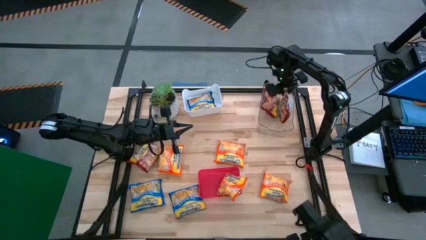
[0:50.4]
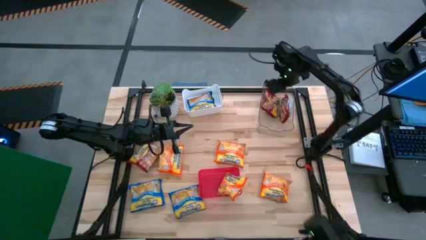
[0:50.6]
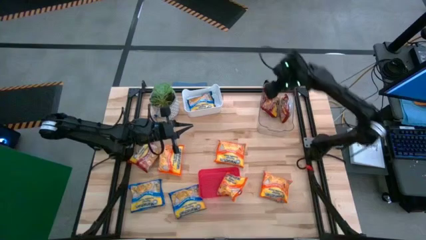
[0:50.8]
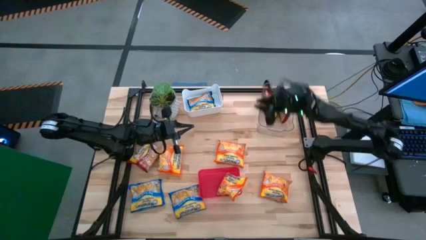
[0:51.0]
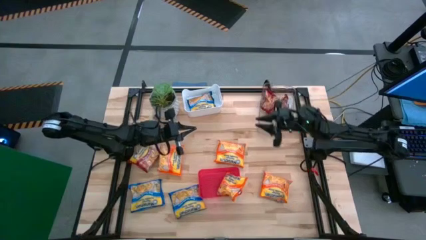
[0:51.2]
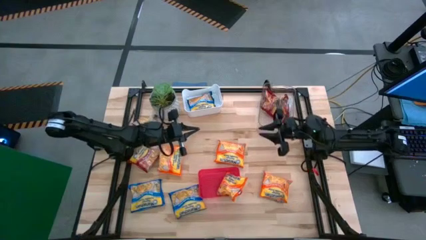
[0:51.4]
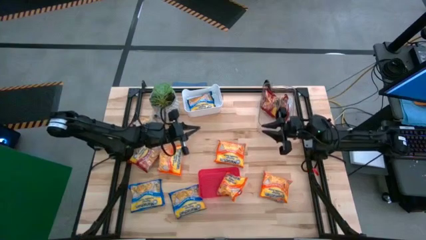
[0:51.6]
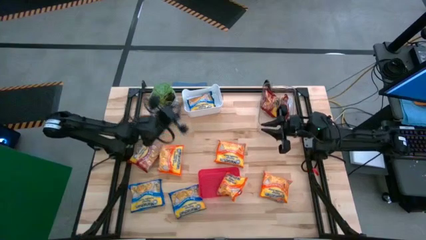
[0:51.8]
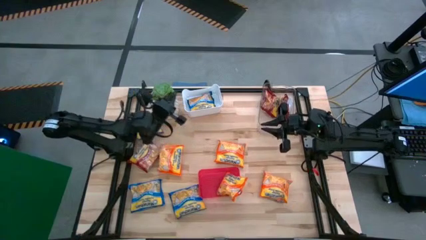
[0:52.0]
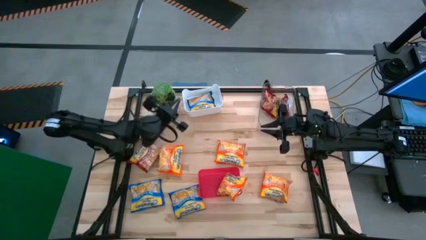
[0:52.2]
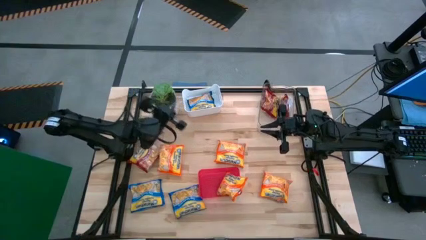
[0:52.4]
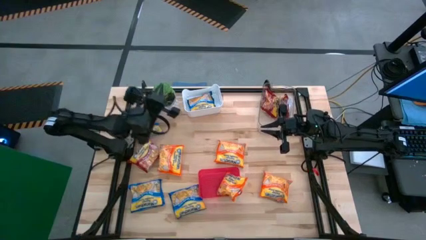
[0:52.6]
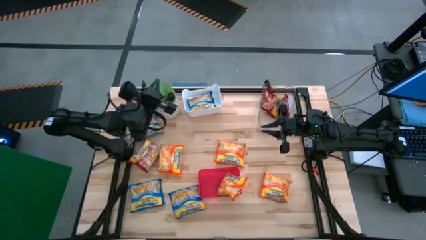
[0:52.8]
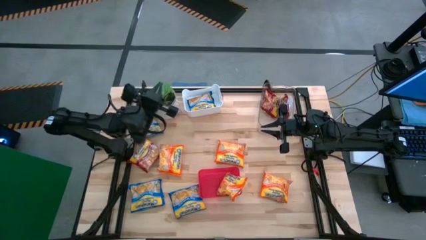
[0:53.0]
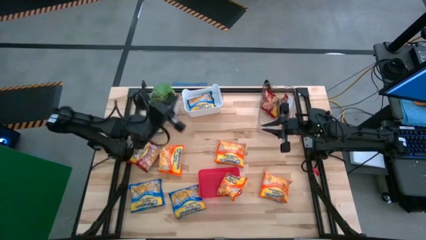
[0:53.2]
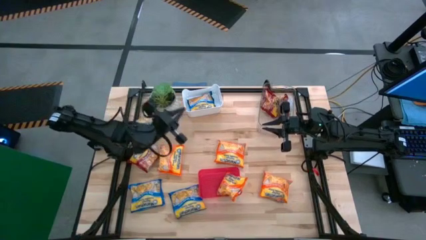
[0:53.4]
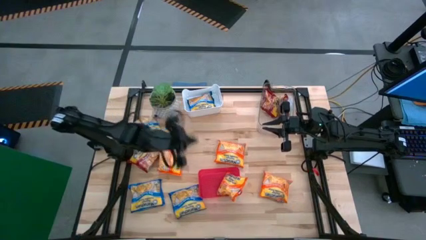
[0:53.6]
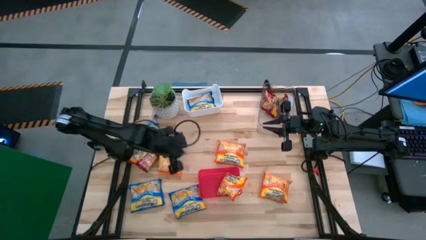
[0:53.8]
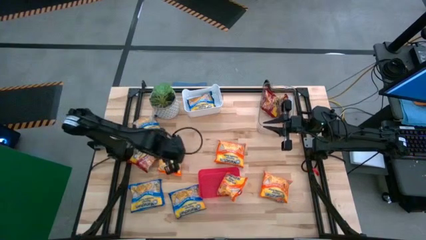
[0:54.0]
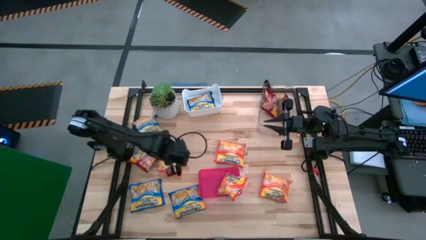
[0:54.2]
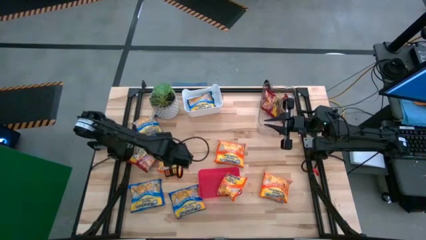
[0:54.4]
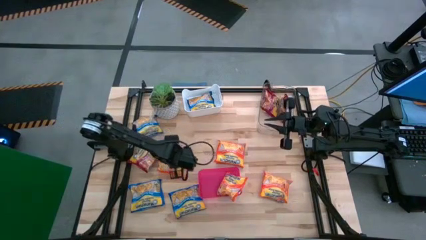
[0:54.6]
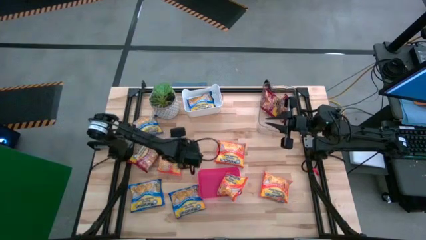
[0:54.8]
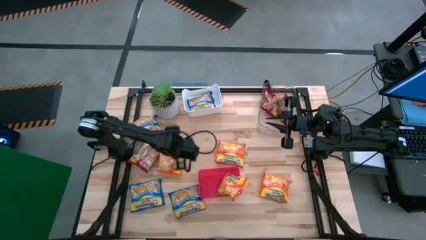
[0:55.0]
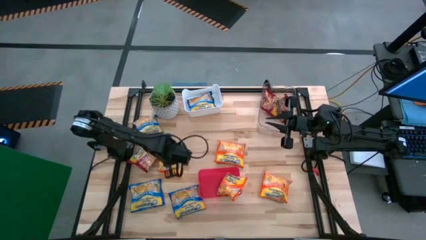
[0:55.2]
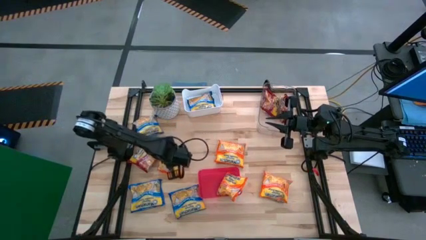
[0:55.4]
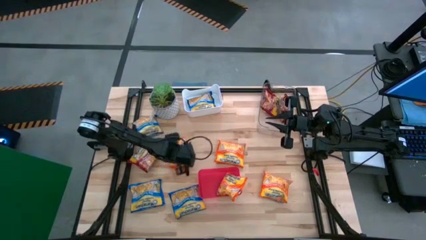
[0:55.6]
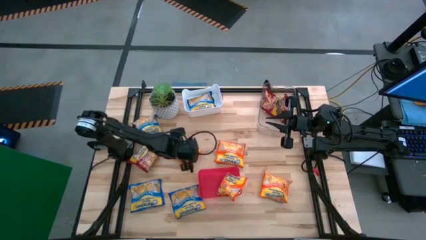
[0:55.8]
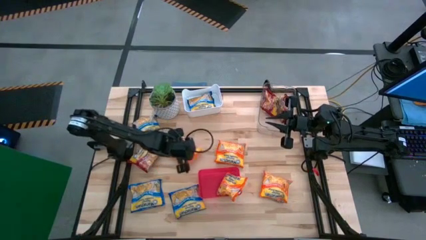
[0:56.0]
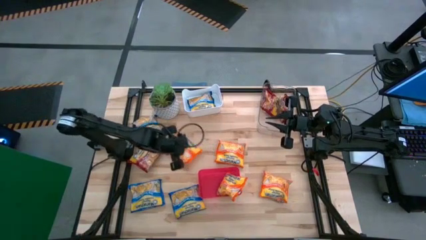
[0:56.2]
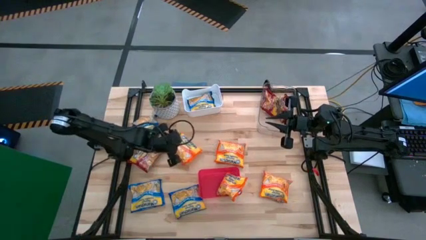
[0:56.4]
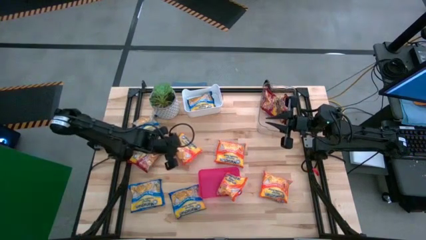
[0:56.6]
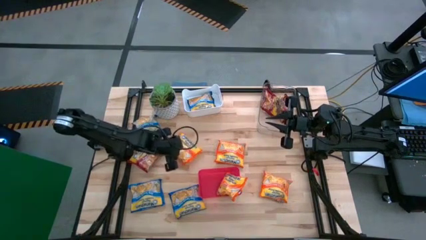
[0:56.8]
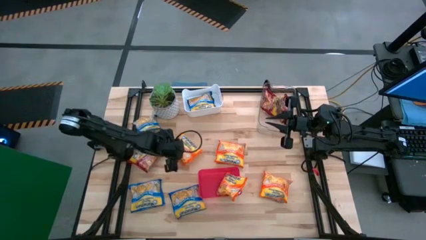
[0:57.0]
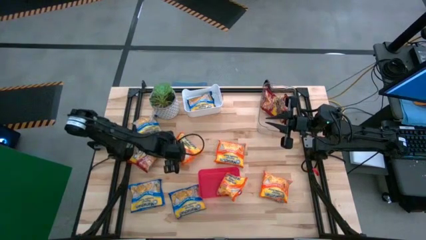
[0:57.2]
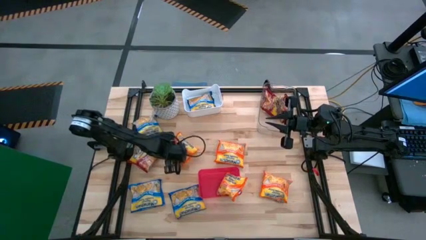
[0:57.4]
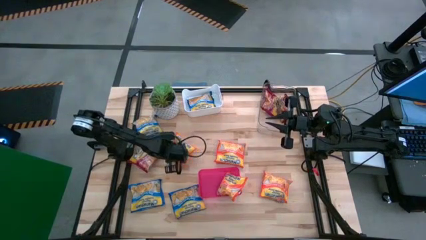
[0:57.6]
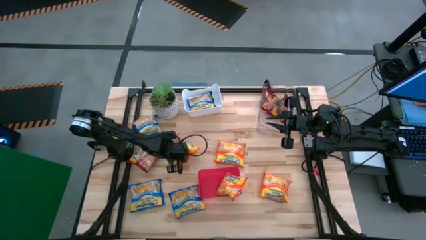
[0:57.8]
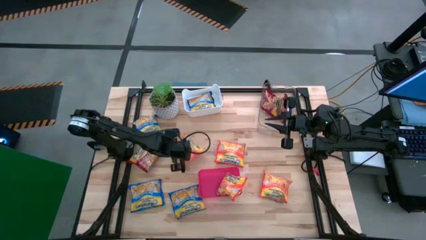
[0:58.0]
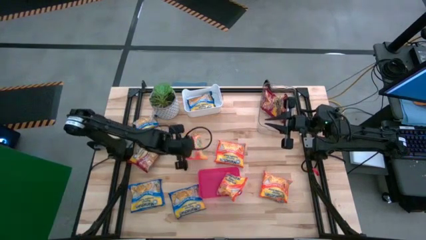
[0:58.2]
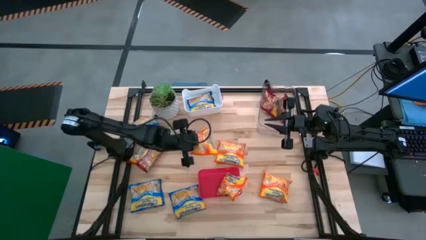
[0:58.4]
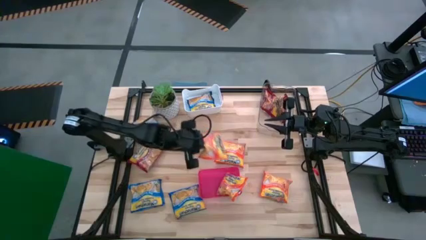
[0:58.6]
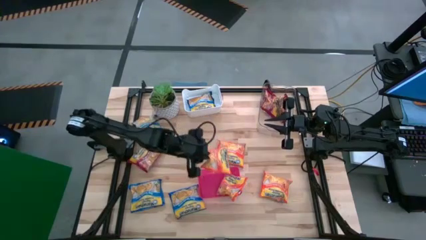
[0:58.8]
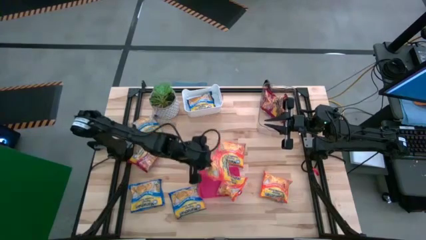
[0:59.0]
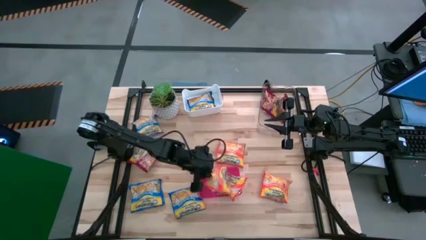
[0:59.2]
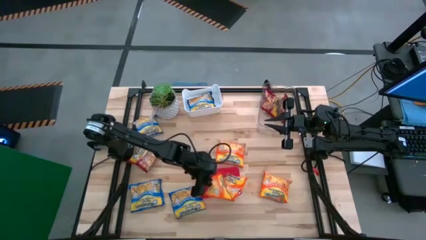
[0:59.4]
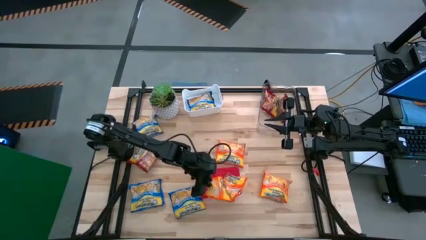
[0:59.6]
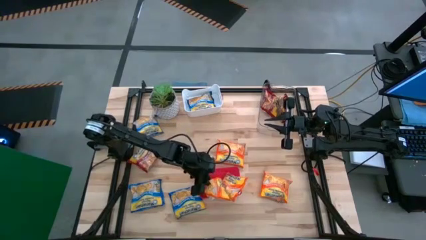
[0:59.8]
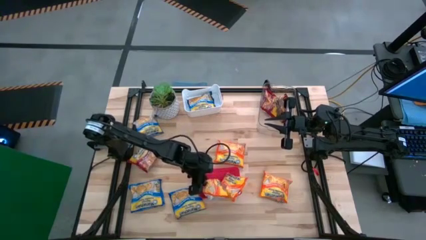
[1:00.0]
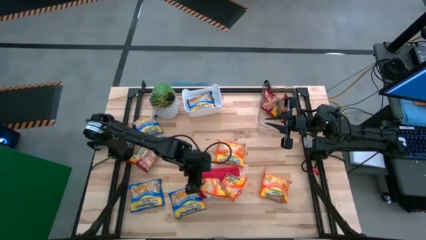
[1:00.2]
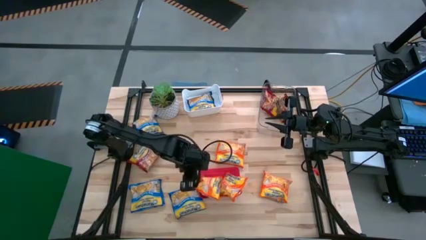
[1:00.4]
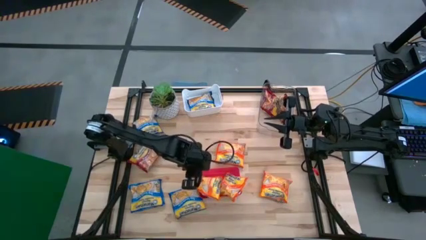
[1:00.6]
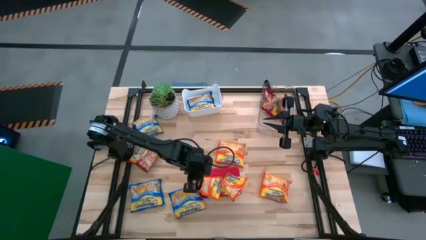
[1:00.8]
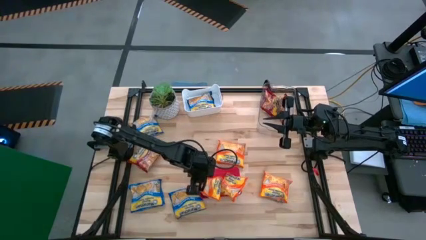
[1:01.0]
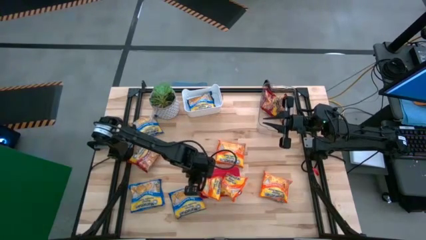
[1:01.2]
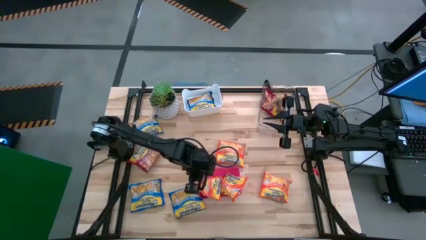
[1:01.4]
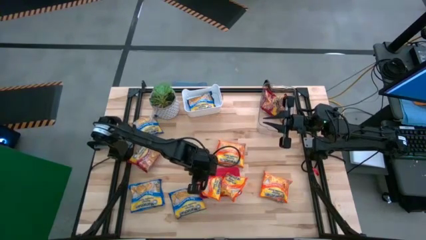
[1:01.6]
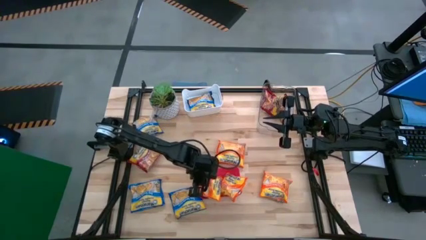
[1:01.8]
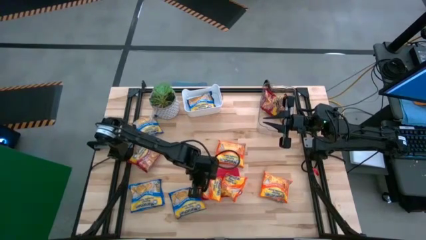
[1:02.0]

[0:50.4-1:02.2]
Task: Sort Maruchan noodles
Put the orange noodle pack into the red bin

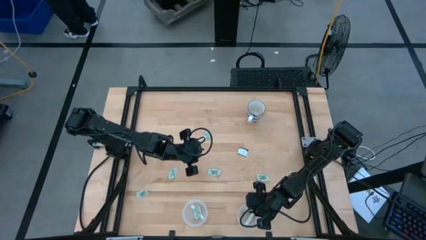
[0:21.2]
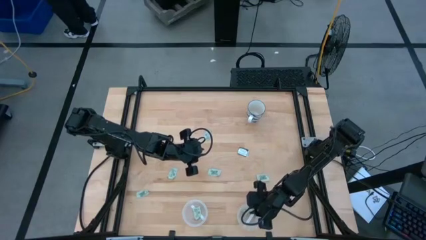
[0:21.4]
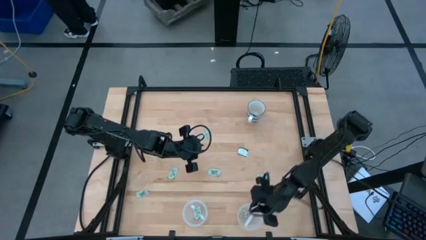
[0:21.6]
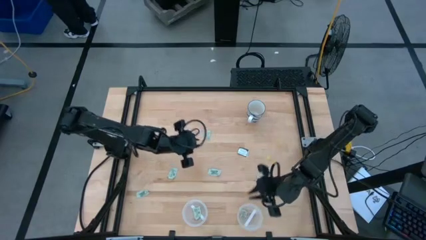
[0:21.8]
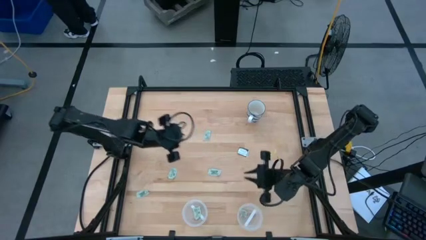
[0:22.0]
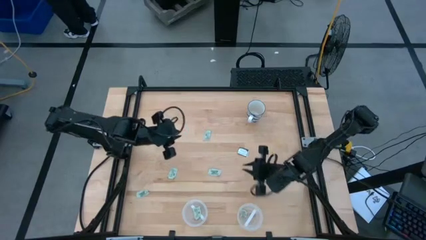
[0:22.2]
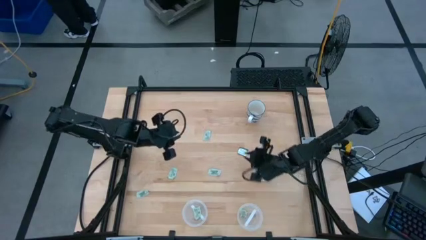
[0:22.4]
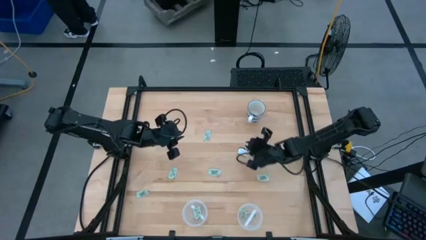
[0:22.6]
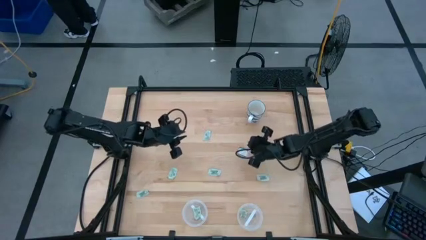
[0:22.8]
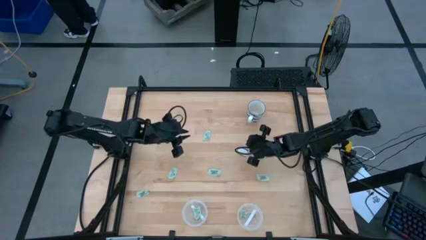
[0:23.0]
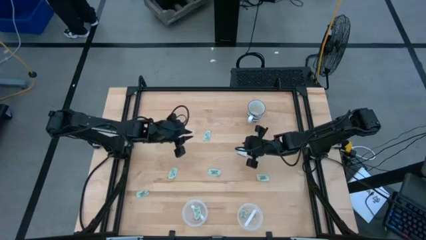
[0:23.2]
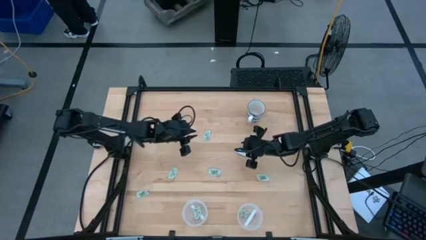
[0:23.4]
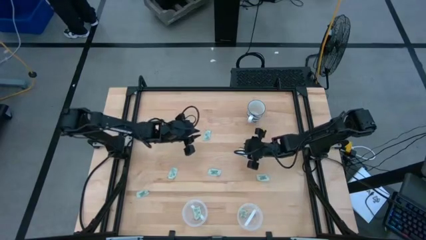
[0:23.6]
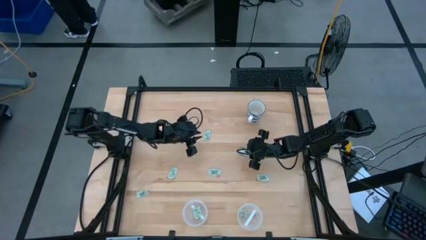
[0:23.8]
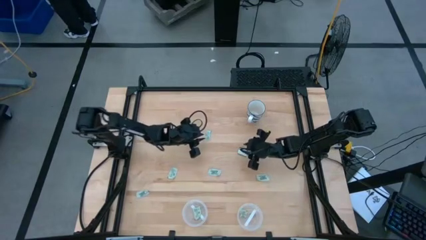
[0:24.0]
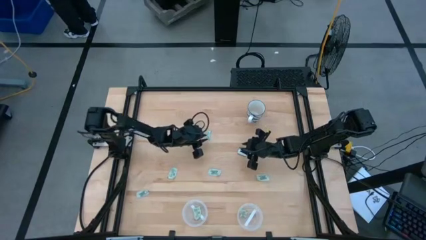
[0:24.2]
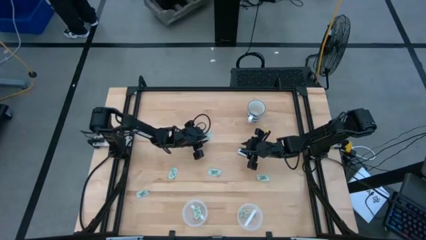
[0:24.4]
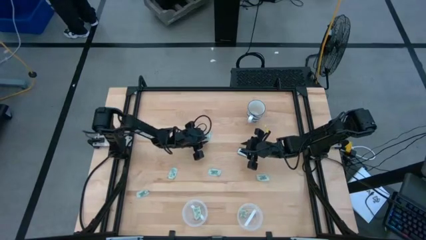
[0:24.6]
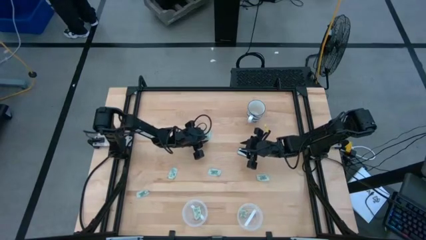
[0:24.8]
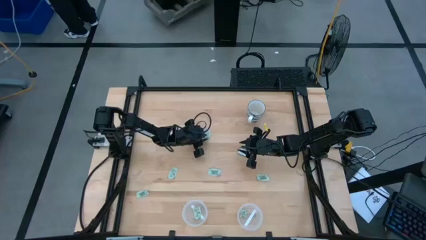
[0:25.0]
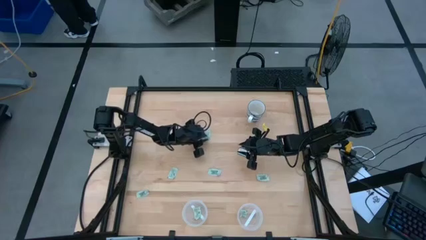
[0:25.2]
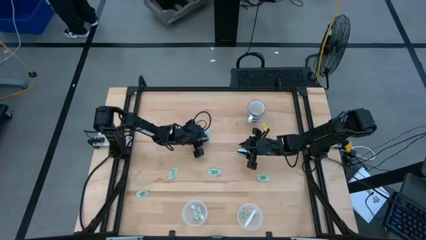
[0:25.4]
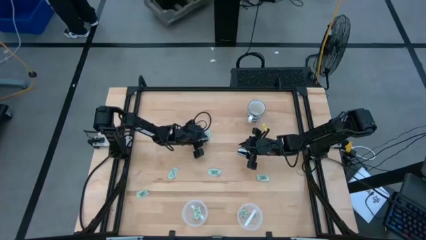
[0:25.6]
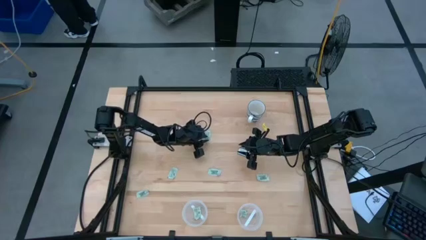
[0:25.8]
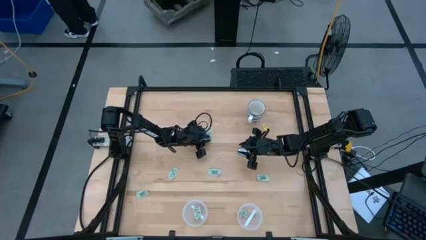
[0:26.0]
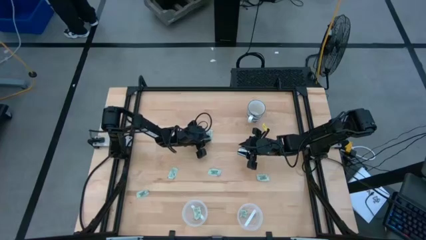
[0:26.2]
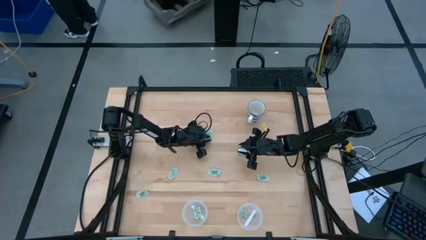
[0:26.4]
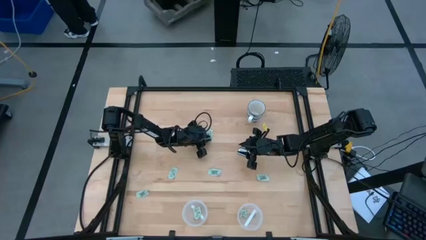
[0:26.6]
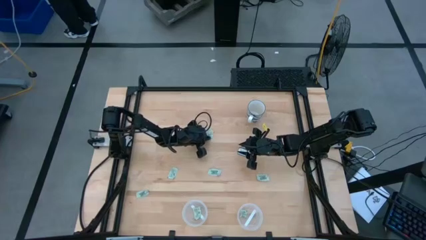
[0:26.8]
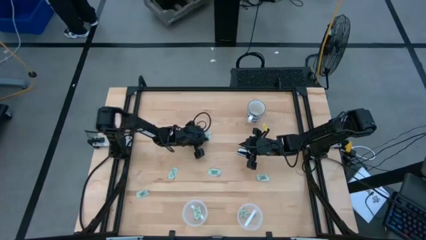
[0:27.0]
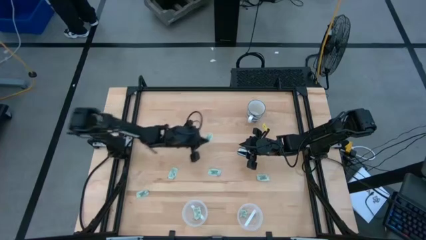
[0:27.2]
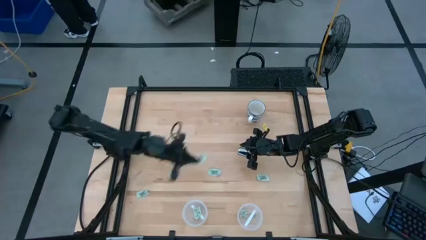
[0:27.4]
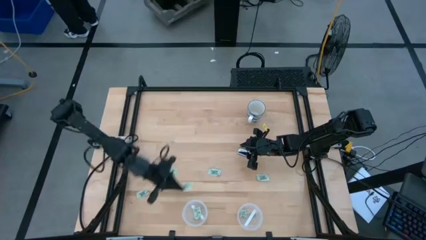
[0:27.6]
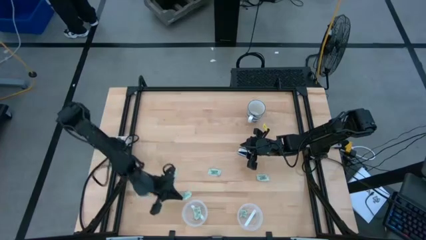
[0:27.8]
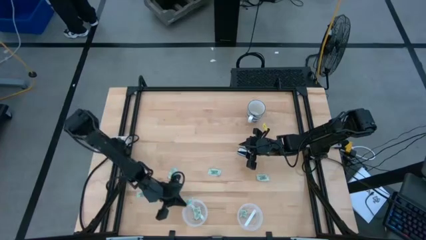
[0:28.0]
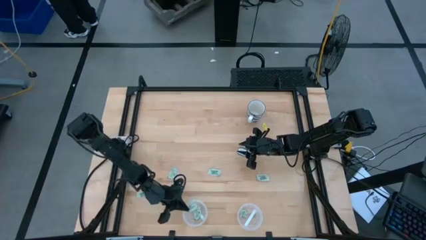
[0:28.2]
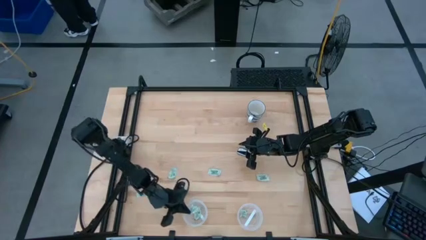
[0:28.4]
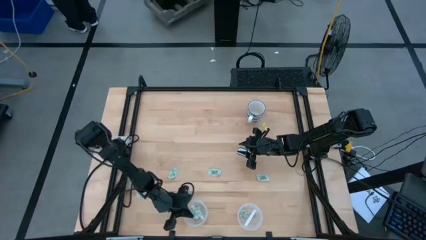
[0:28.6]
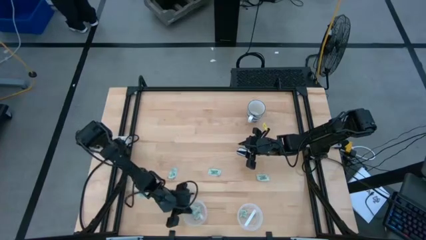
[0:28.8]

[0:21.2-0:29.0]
Task: Pick and place Stevia / Truvia into bins
Put the white stevia packet into the left transparent container
